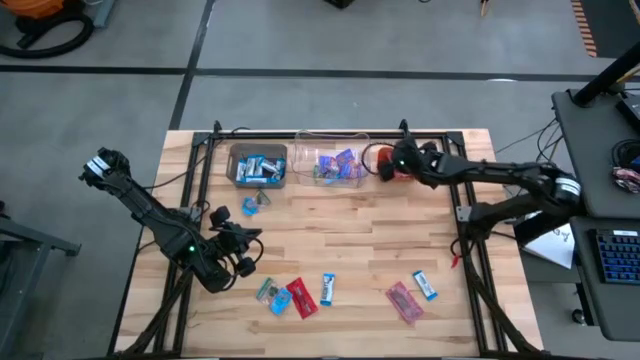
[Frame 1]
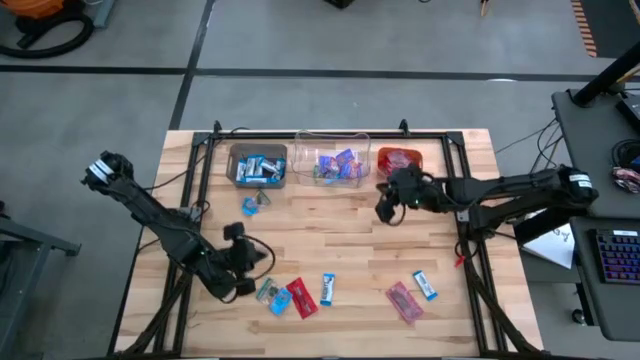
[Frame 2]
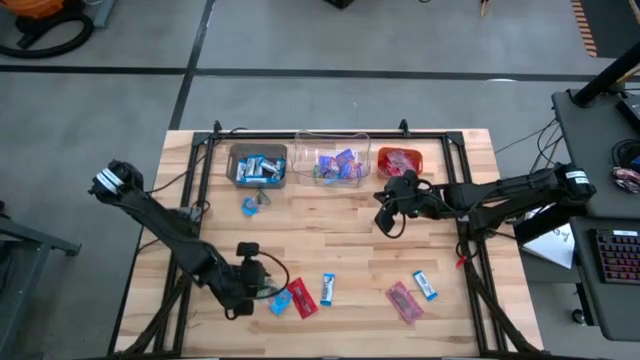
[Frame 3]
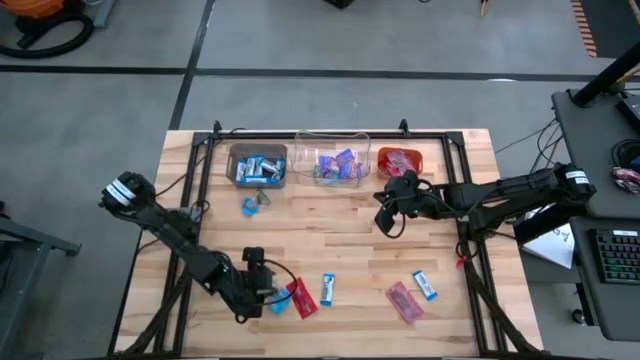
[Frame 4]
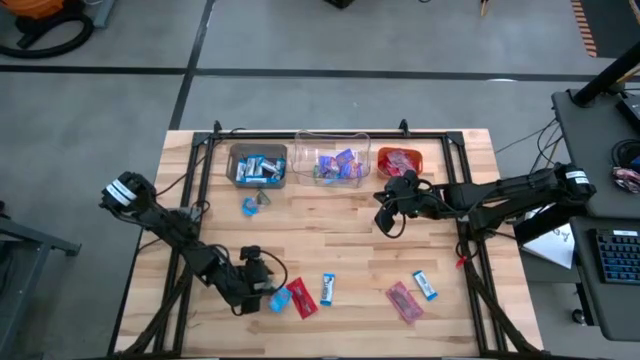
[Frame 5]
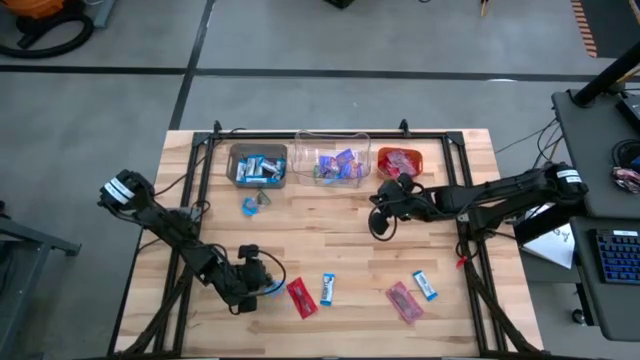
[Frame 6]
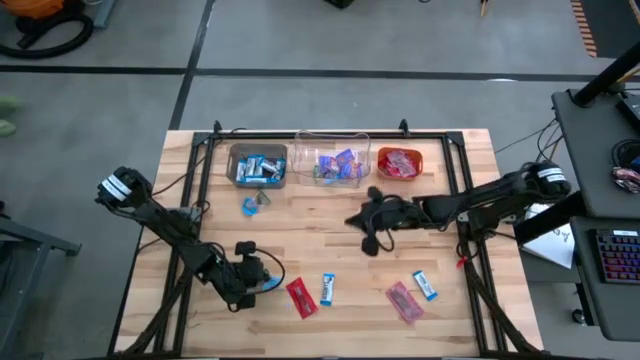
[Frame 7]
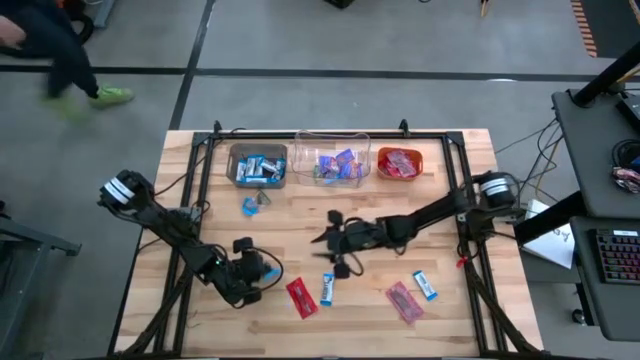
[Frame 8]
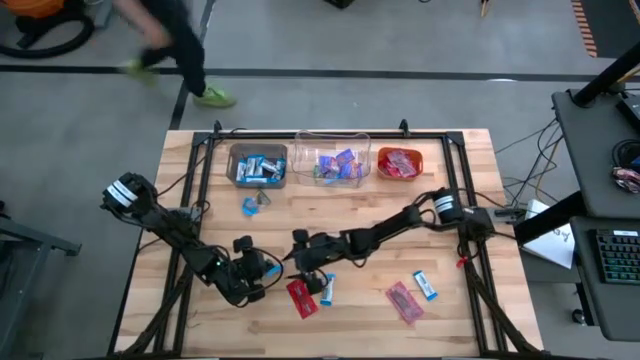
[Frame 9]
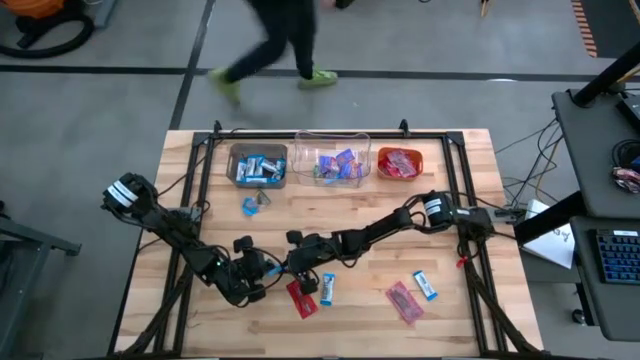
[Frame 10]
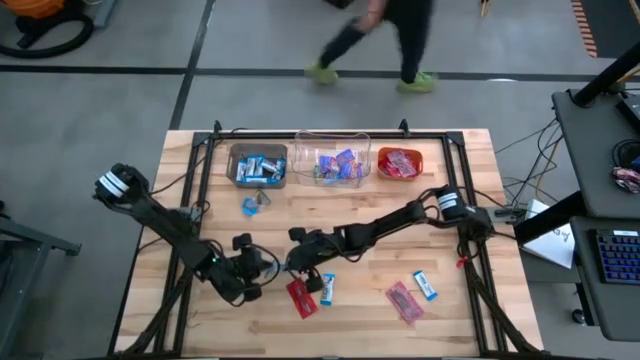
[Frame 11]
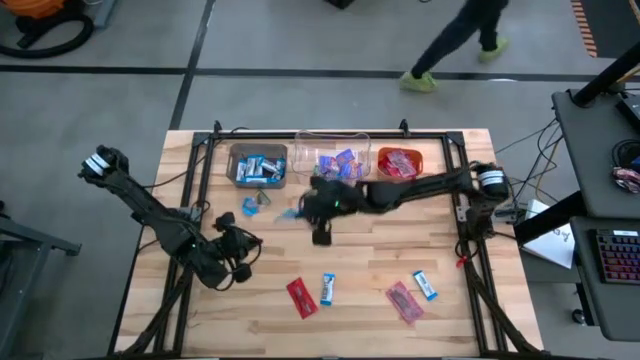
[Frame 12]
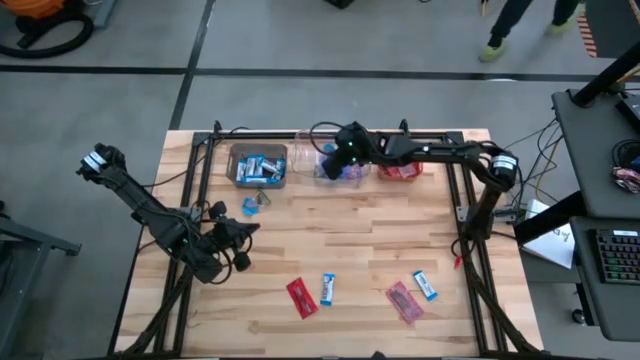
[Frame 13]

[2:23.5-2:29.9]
Task: Sort candy
Put the light blue candy into the transparent bin

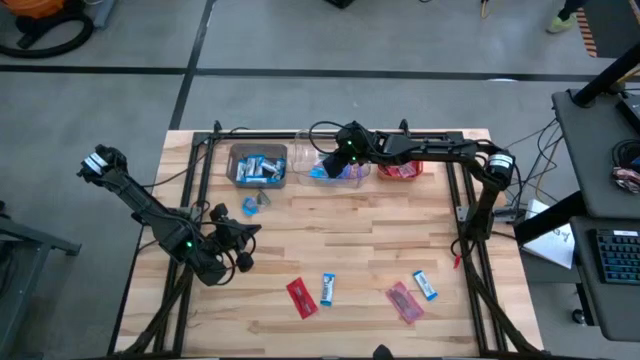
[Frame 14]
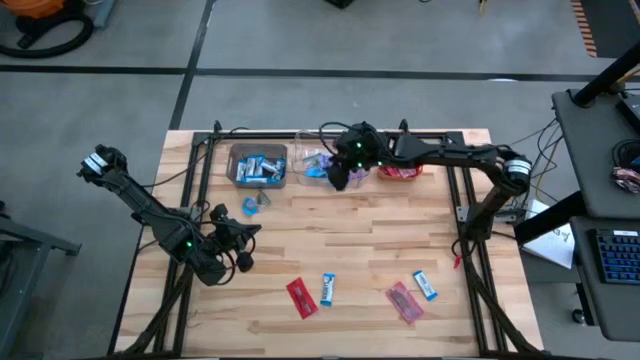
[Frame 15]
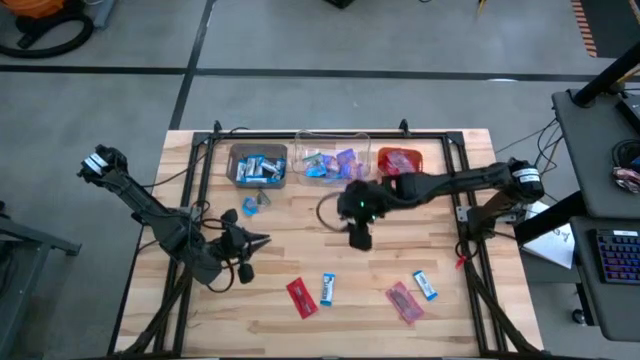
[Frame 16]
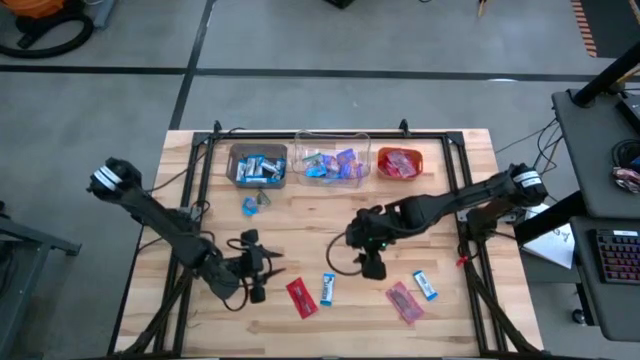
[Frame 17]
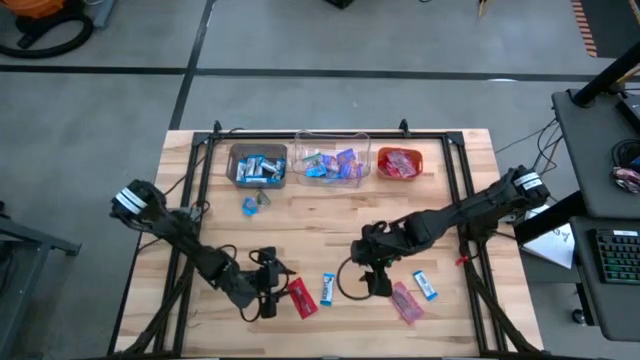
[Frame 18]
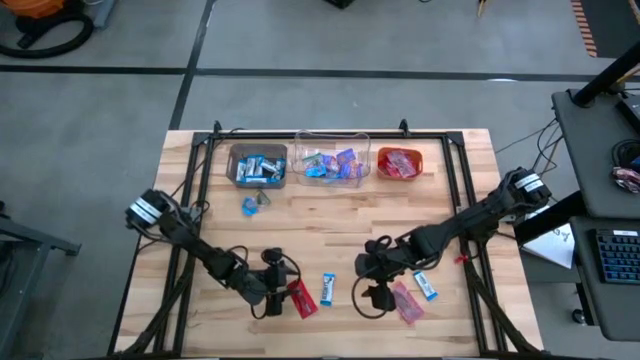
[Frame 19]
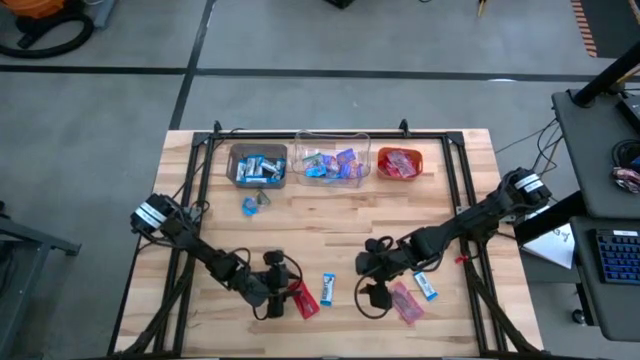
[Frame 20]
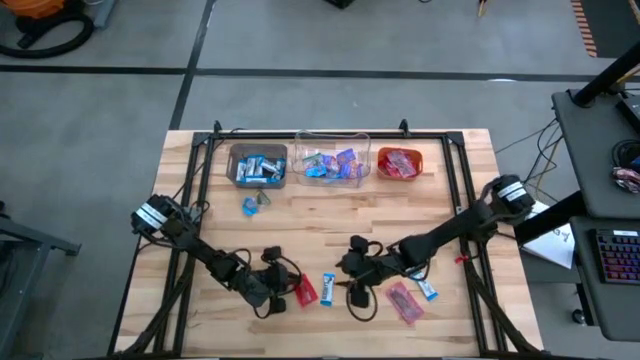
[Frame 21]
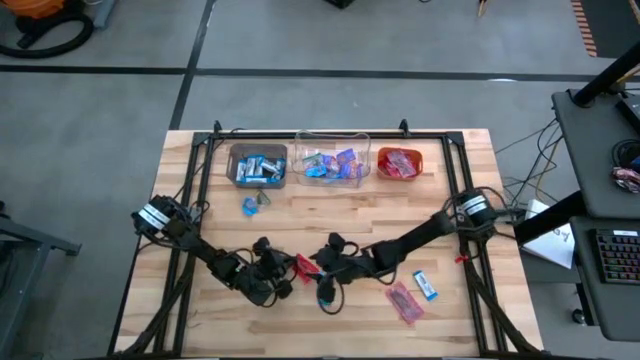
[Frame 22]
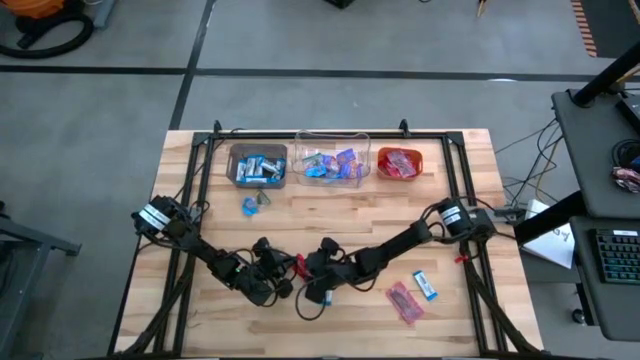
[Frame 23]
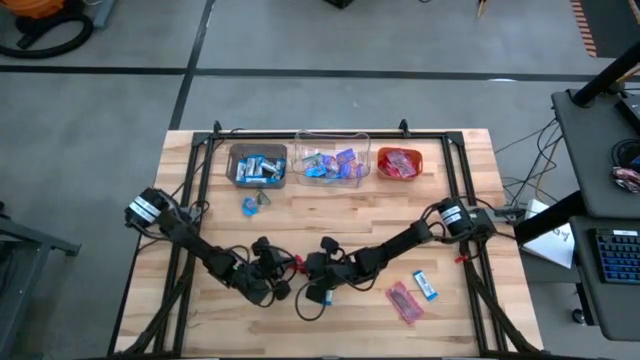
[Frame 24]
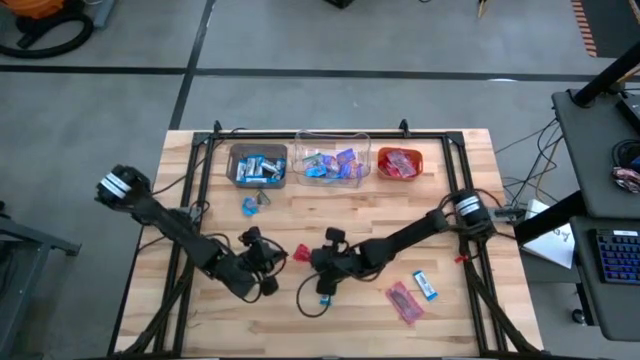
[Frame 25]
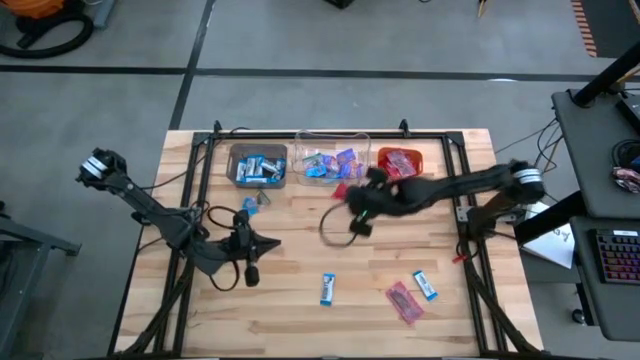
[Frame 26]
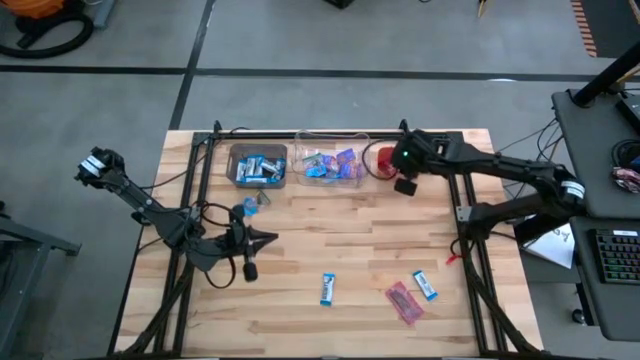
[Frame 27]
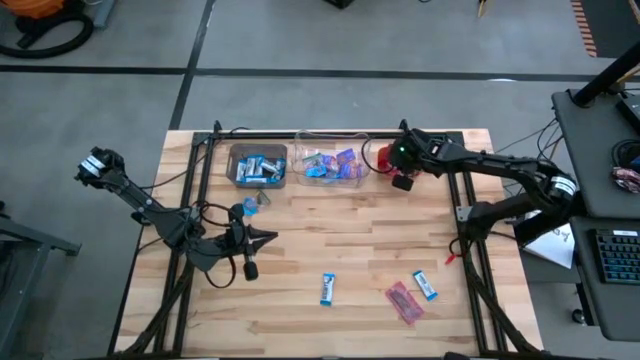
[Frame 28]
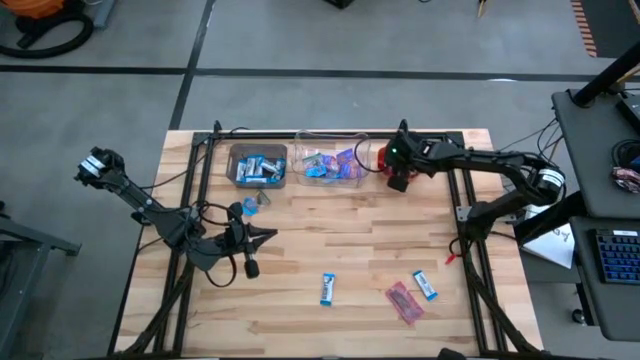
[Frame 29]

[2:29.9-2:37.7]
Put the red candy into the orange bin

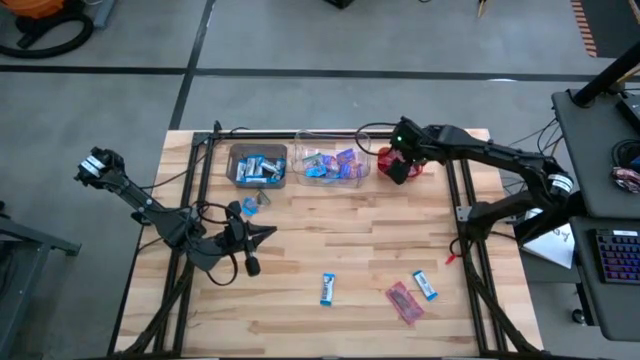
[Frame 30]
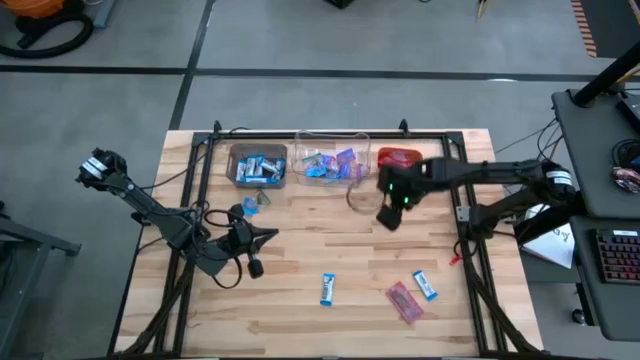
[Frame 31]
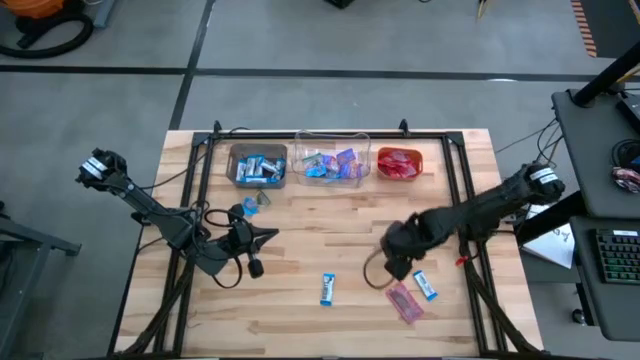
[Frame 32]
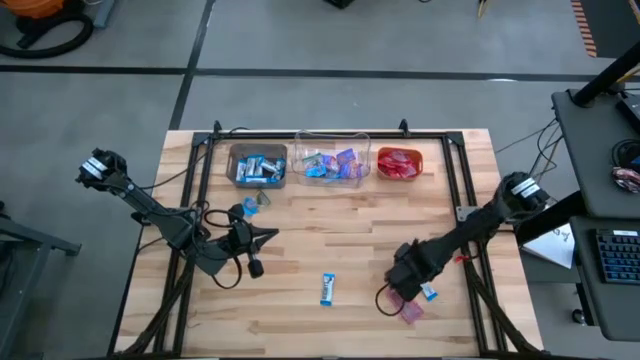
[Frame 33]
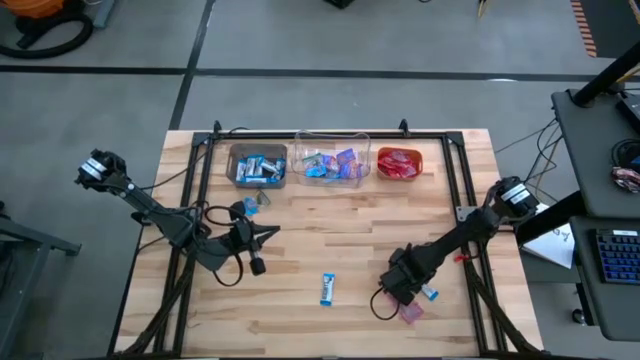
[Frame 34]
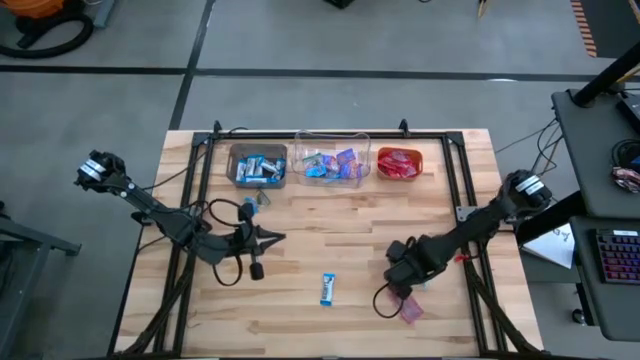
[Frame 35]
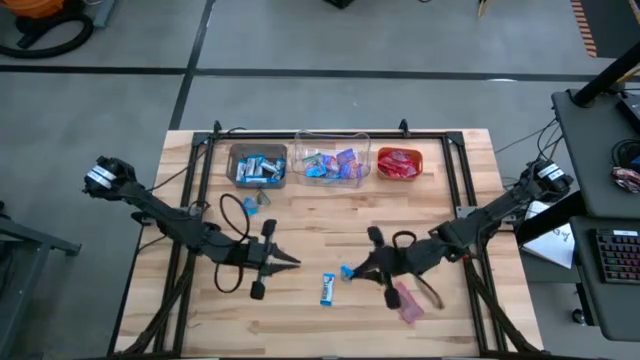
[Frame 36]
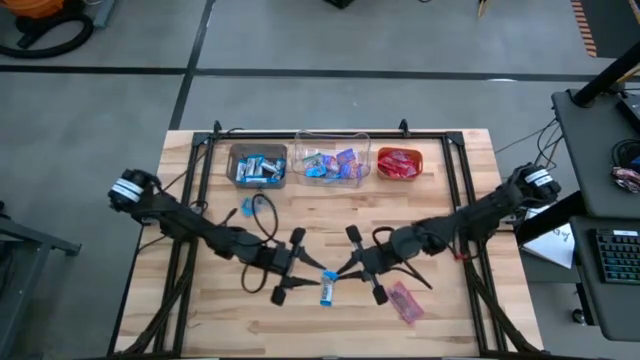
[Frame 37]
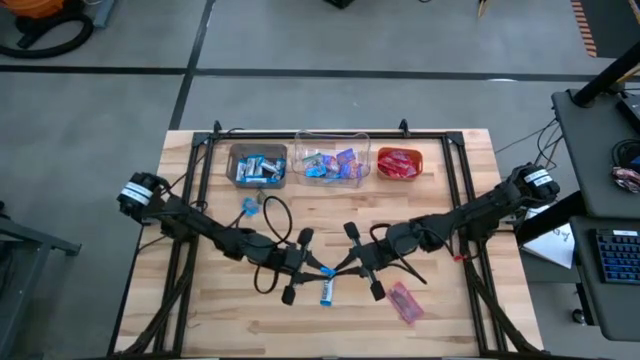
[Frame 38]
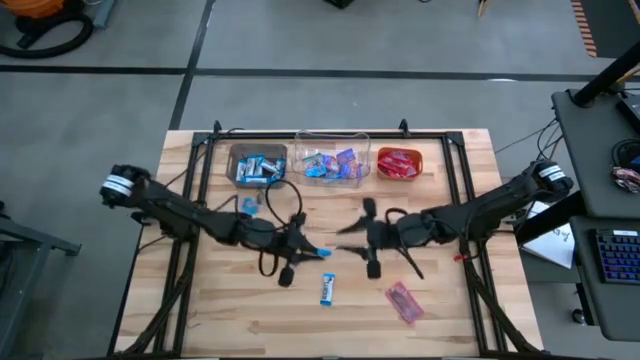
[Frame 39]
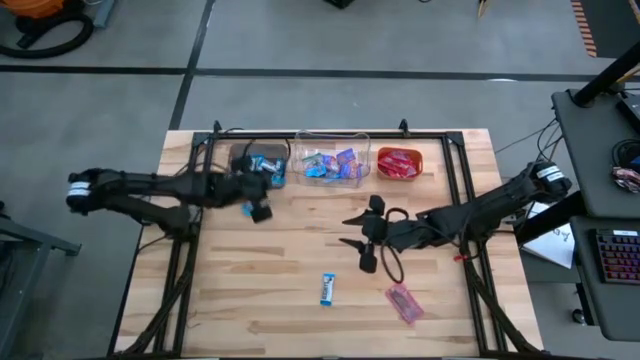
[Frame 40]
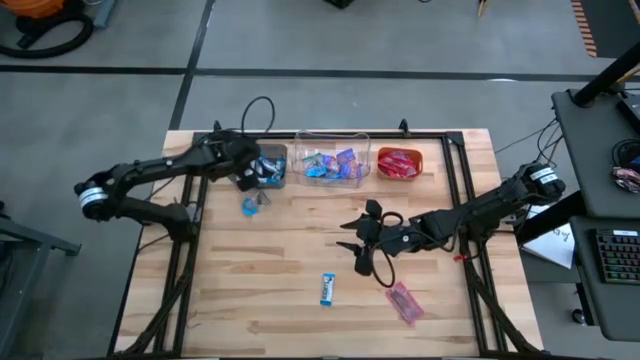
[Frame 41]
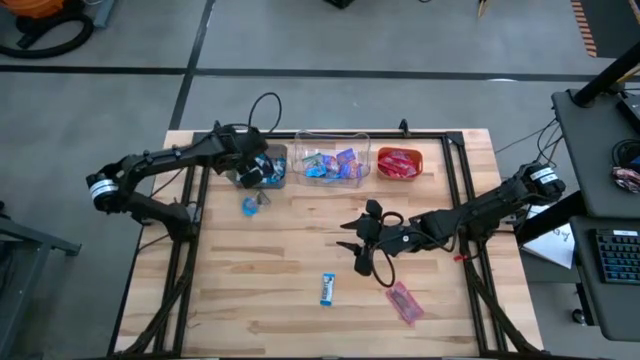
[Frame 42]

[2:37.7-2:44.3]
Put the white candy into the black bin

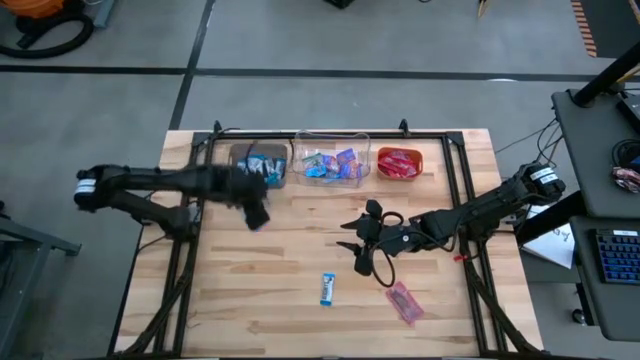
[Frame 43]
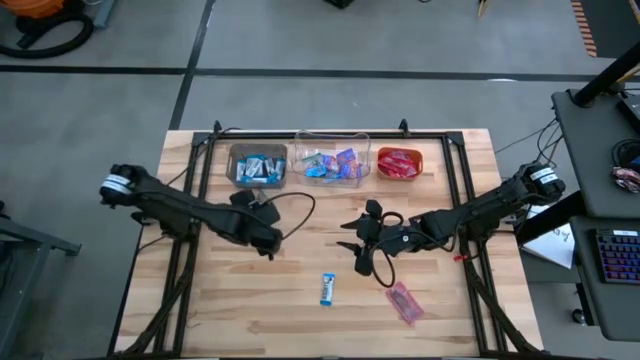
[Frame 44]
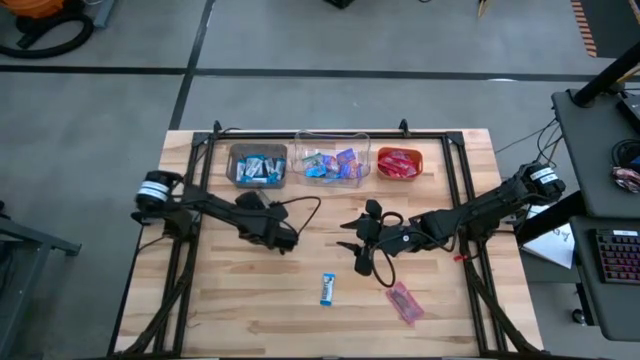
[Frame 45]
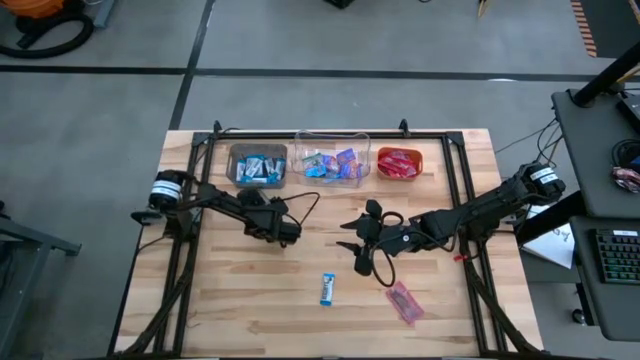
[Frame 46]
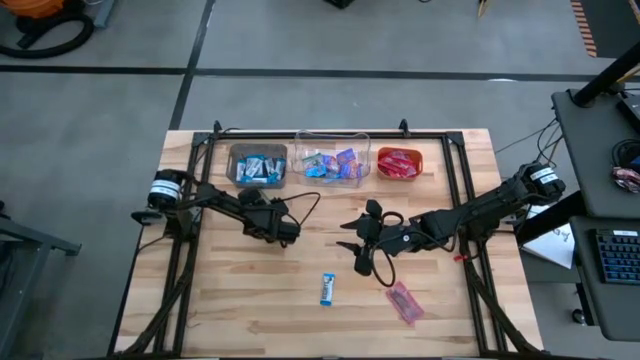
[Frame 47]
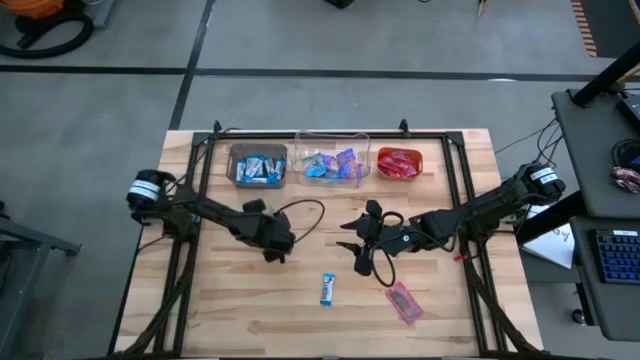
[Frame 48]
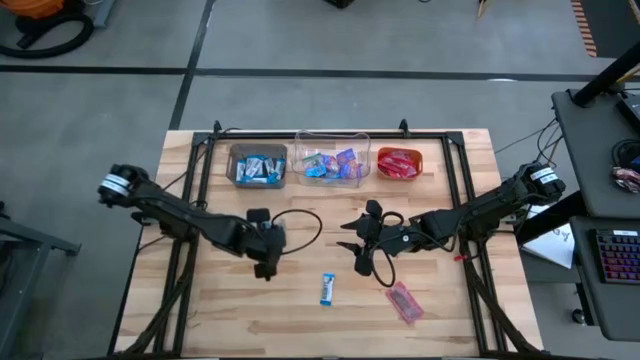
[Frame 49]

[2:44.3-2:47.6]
Put the blue candy into the transparent bin
